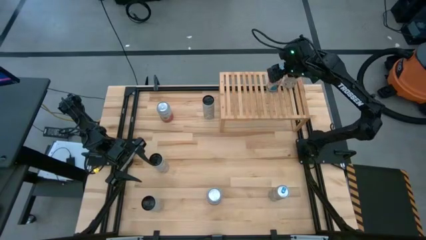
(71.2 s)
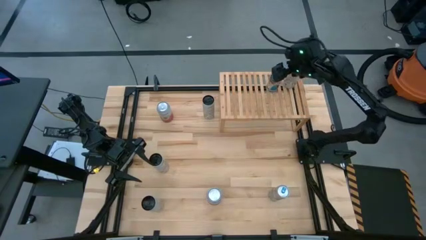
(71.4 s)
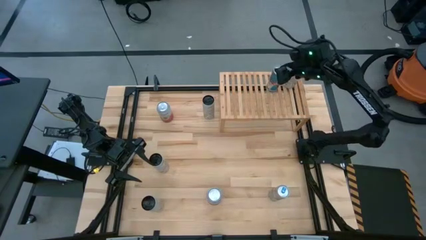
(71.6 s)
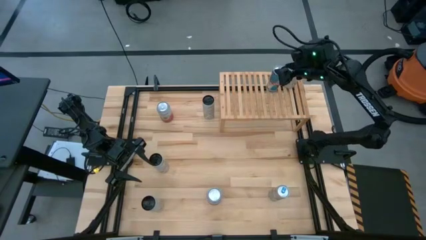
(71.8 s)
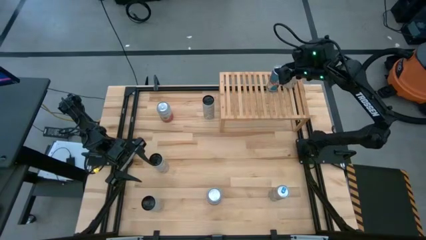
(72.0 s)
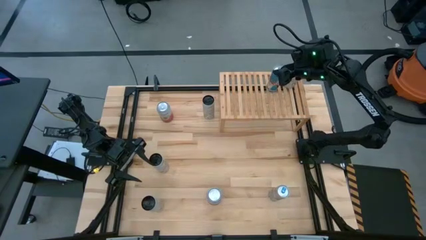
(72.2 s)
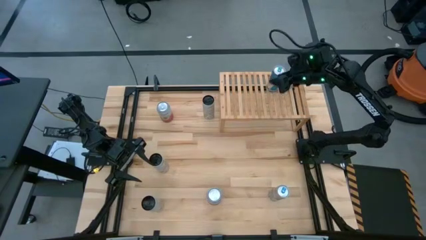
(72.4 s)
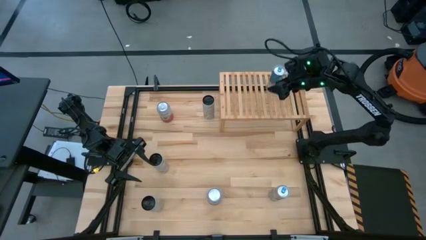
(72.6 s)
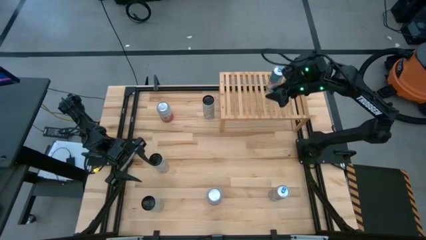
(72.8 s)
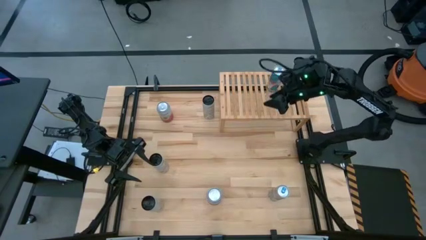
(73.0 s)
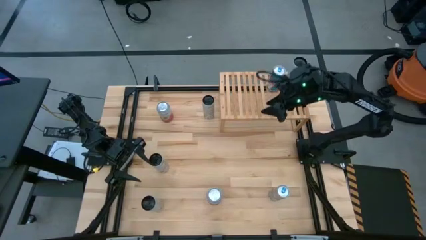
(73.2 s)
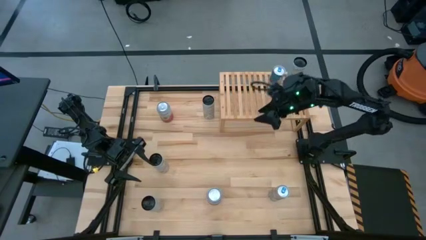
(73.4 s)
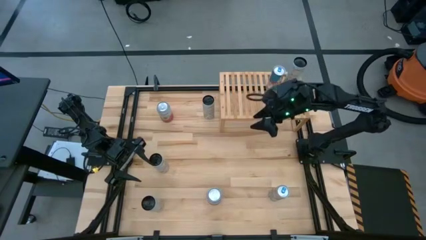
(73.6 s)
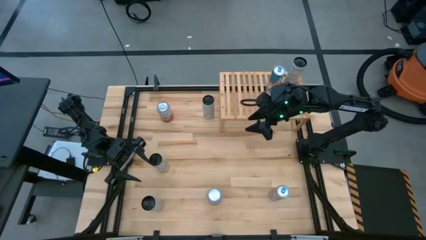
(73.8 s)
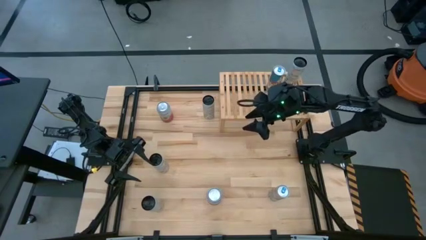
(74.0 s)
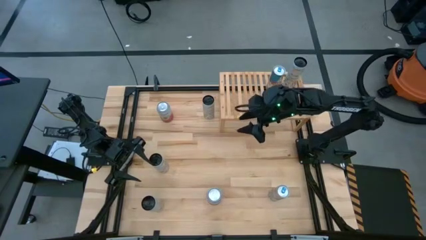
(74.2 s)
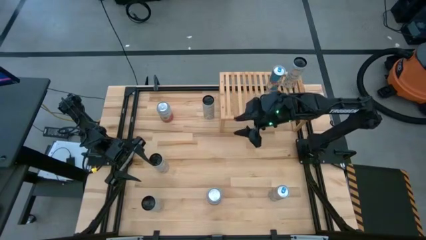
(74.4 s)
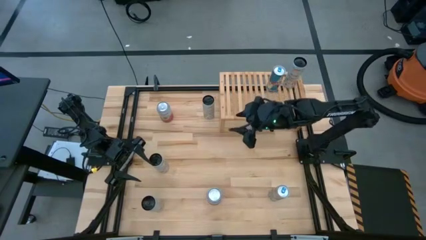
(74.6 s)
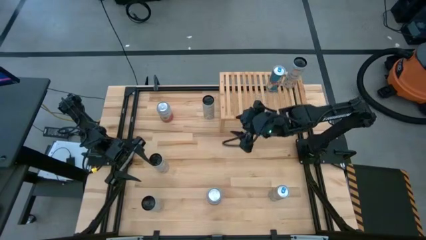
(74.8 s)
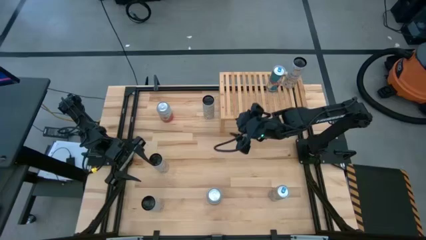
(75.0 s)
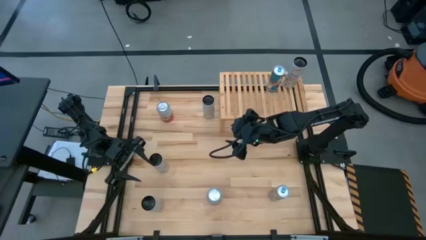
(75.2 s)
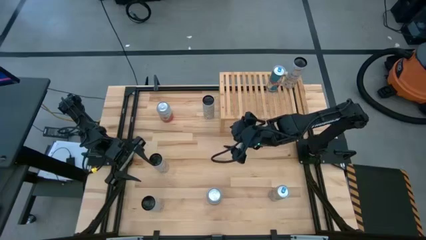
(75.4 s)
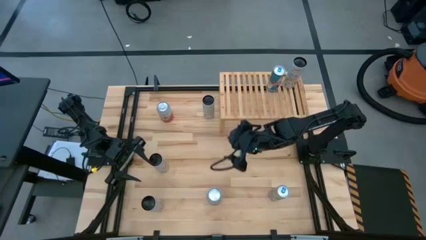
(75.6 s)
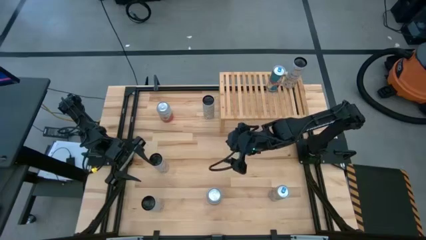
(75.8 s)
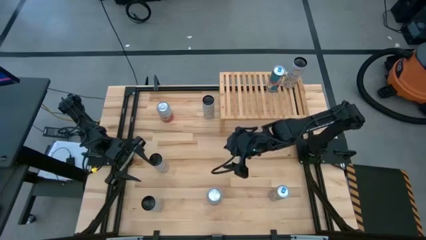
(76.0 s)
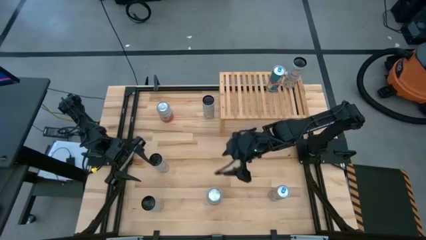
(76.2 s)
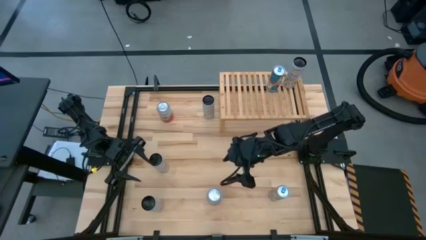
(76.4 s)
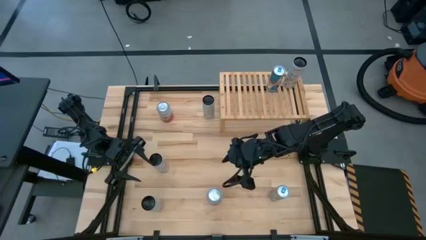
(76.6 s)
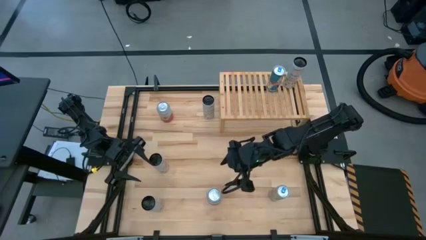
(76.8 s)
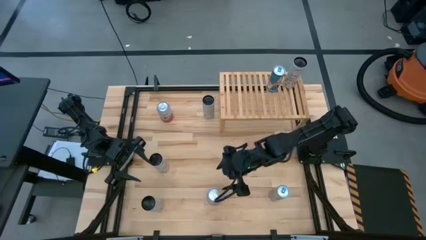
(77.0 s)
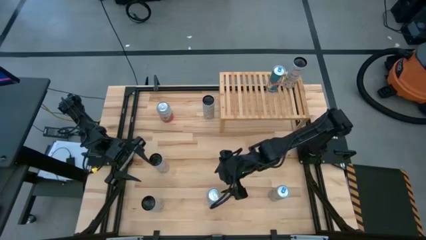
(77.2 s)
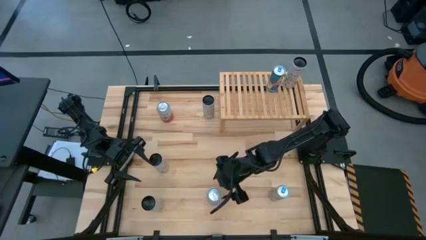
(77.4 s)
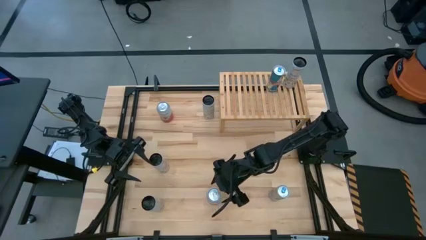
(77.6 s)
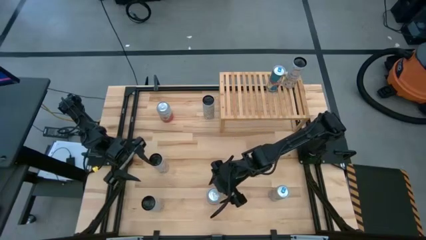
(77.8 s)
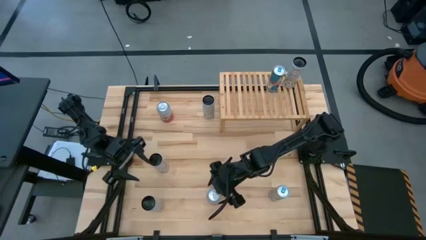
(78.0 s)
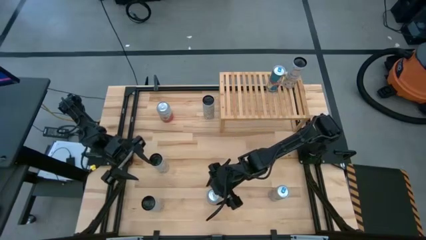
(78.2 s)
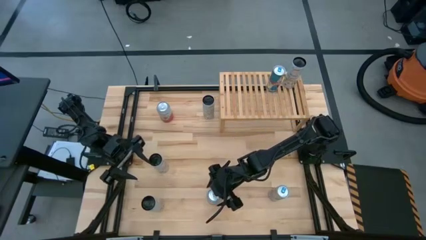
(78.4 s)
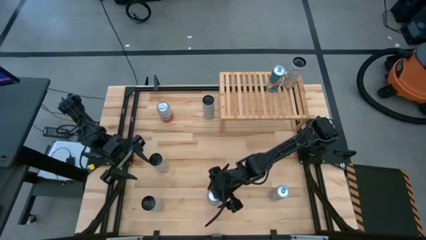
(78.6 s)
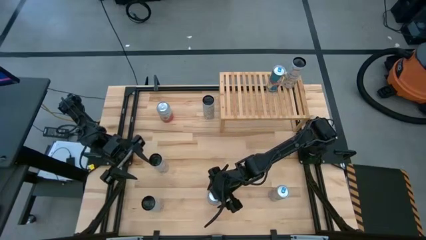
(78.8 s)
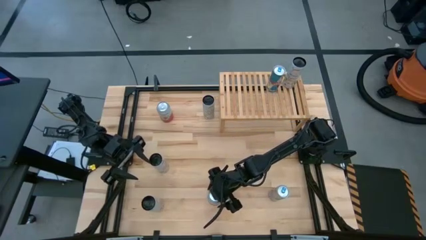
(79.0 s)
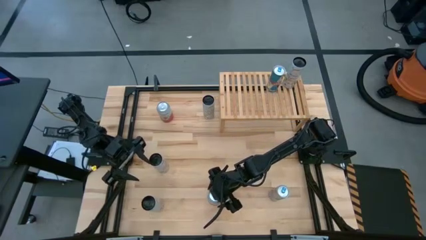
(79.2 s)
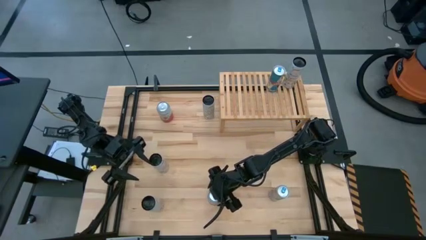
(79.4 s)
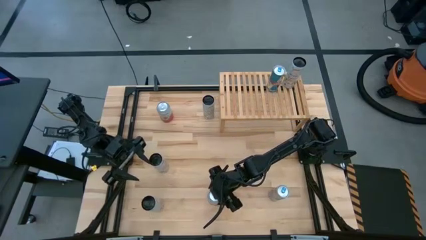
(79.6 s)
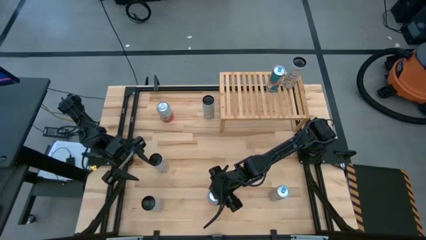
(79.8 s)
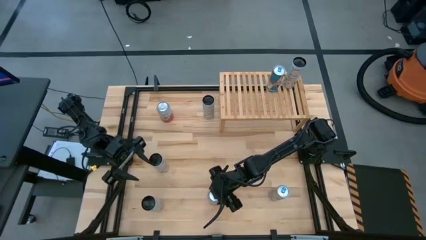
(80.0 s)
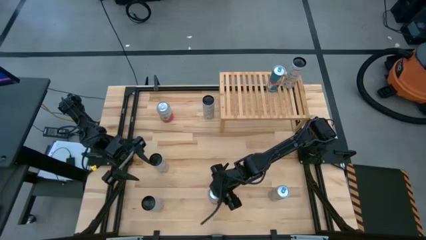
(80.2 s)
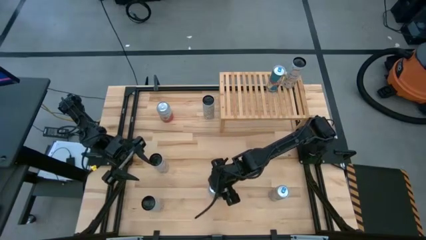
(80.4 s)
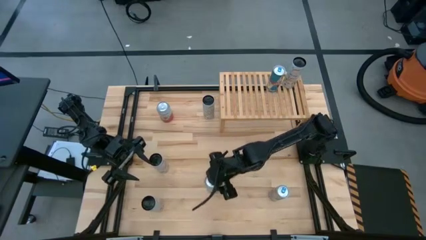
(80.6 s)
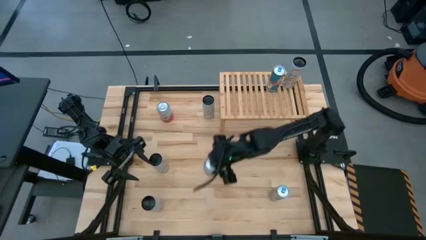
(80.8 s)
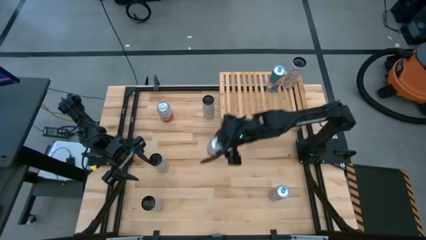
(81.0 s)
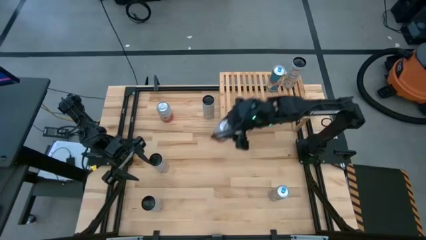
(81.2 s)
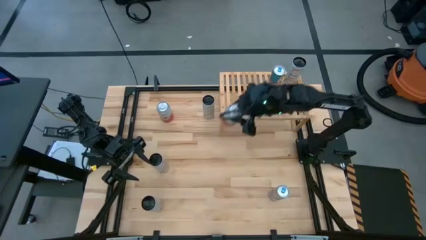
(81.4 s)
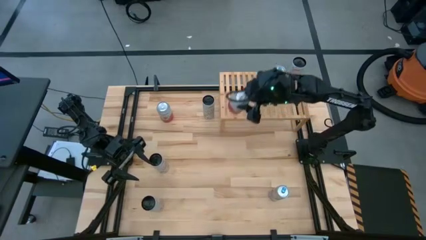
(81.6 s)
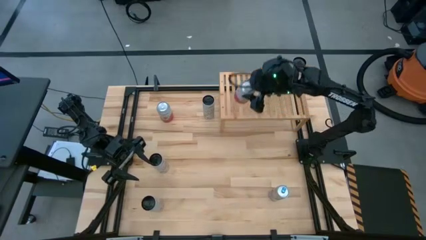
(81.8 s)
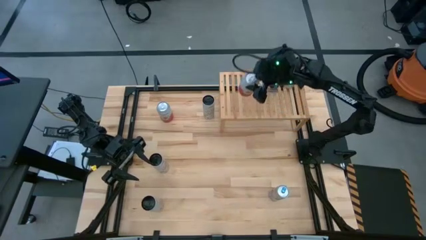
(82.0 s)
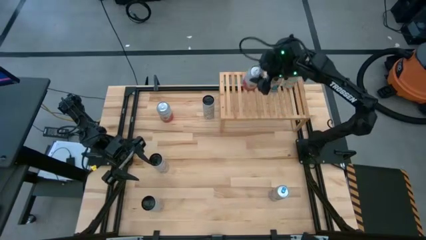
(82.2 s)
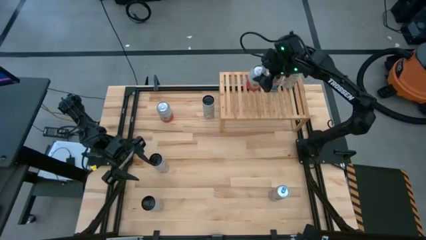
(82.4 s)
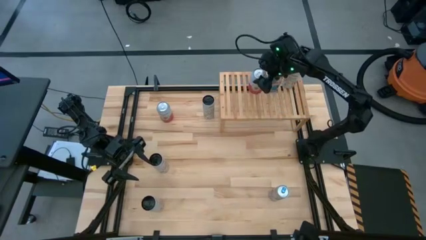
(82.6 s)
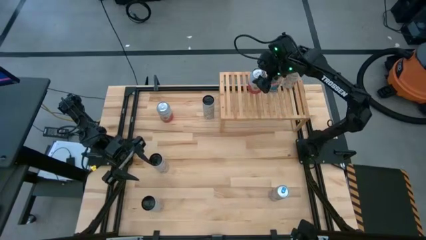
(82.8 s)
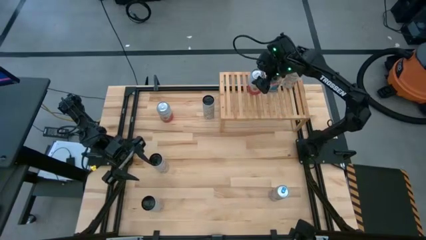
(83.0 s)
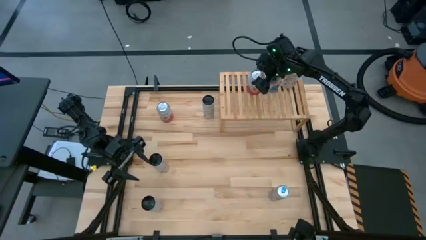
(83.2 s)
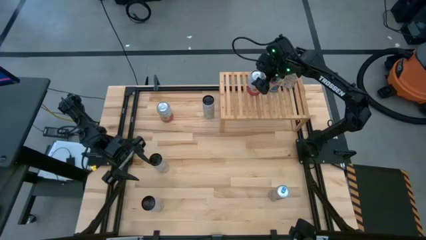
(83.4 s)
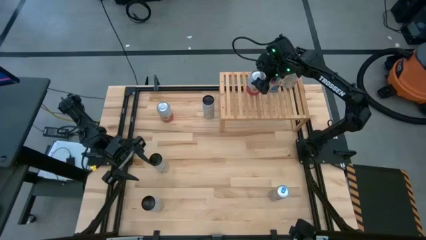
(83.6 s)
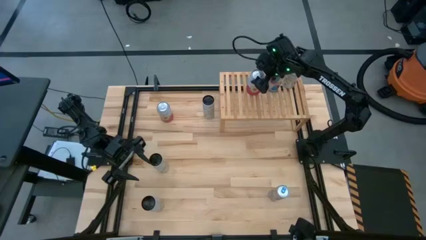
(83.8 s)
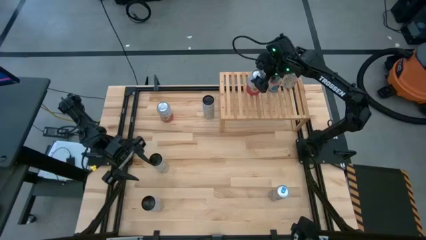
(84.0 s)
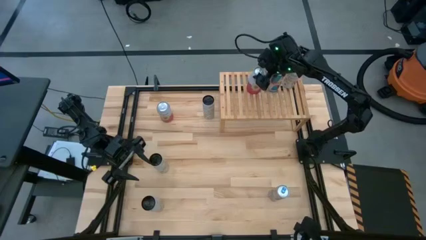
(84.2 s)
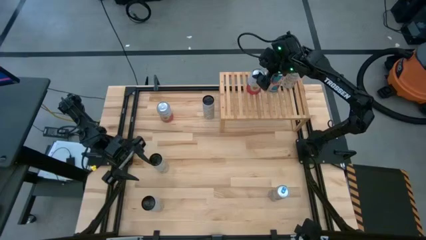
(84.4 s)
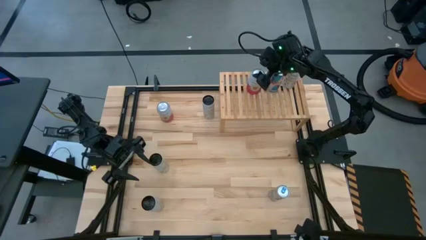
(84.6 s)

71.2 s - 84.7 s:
Task: Place canned beverage on shelf
Put the bottom pink-white soda can on the shelf
